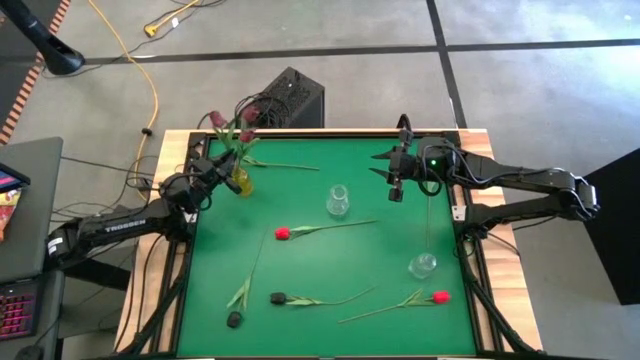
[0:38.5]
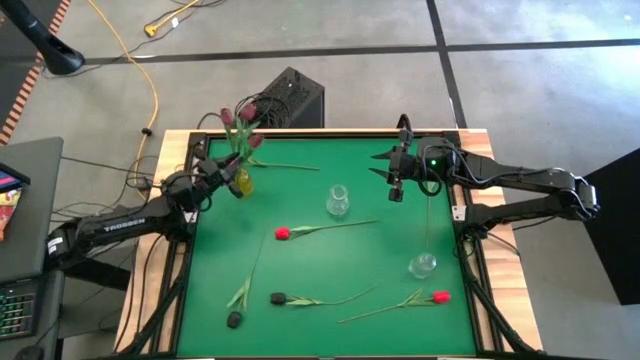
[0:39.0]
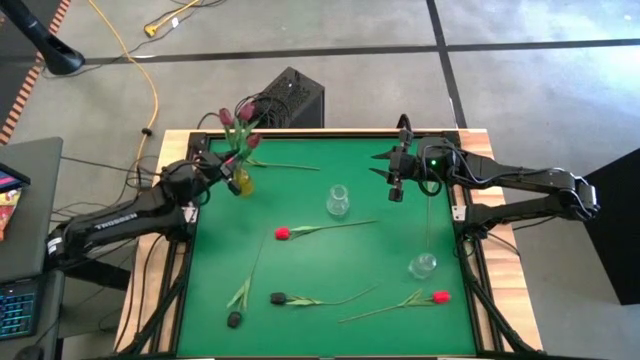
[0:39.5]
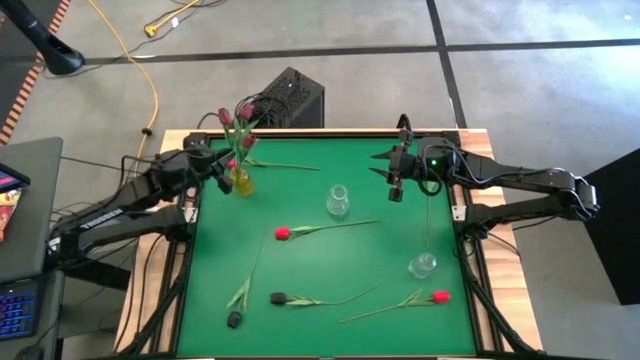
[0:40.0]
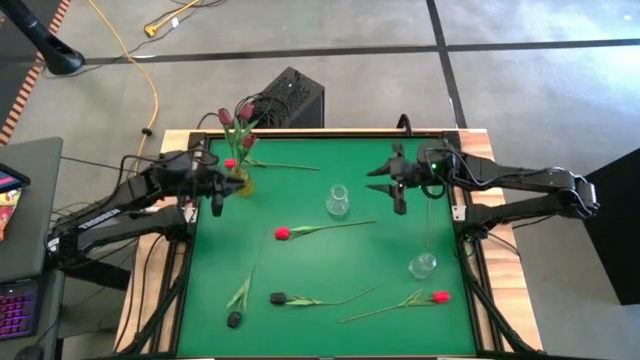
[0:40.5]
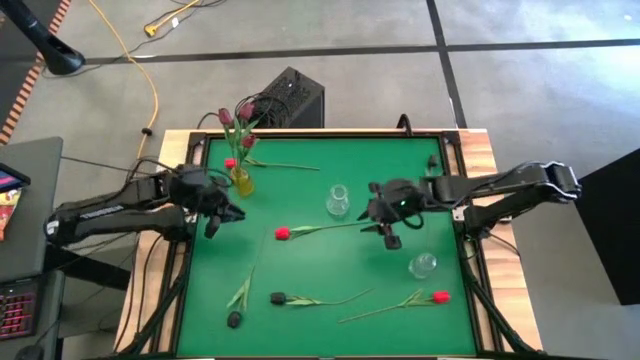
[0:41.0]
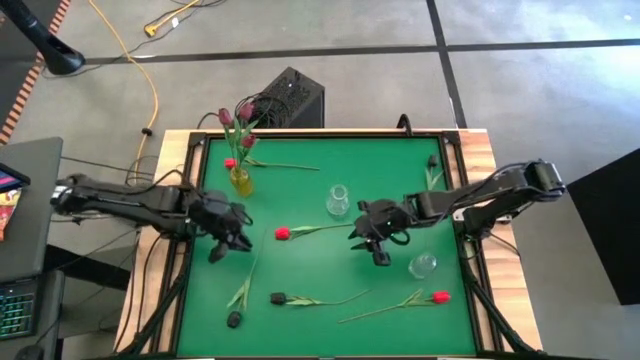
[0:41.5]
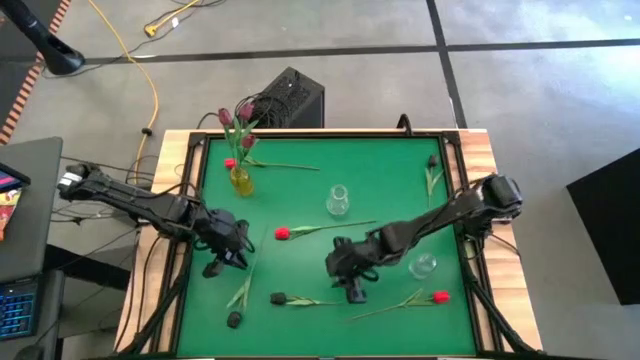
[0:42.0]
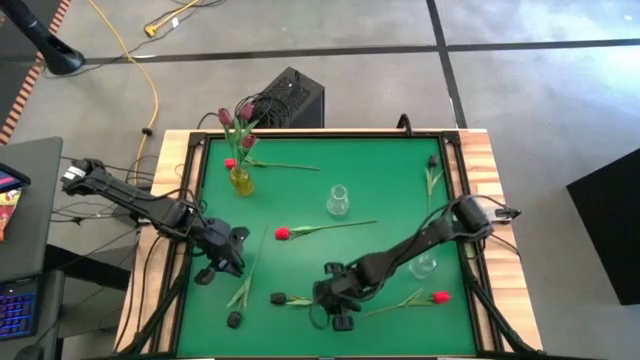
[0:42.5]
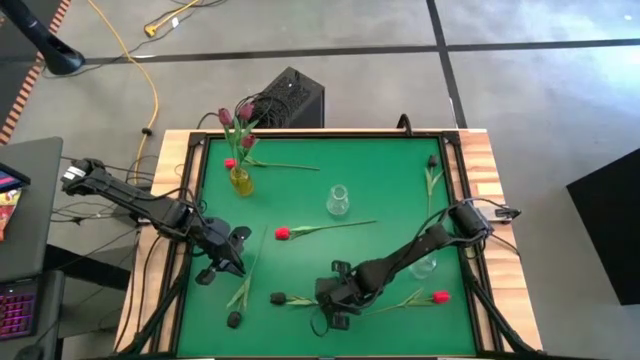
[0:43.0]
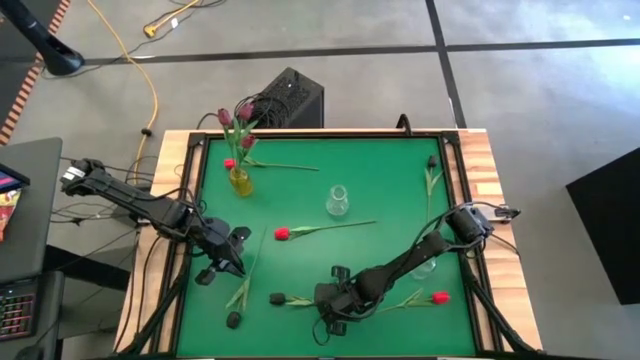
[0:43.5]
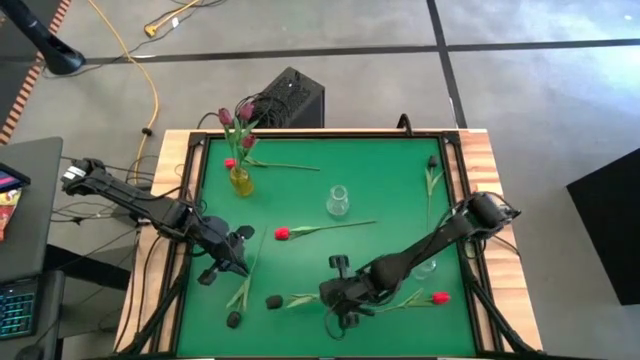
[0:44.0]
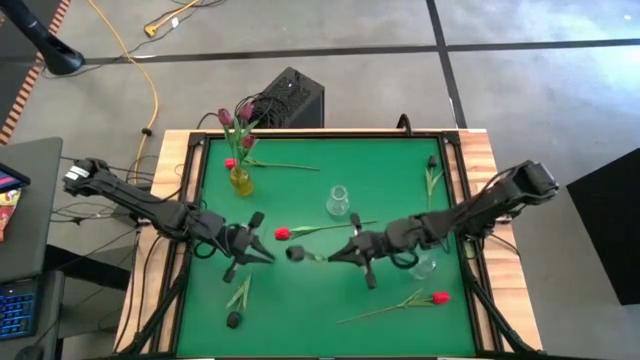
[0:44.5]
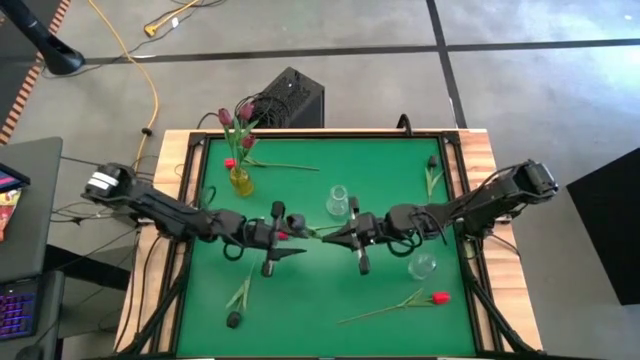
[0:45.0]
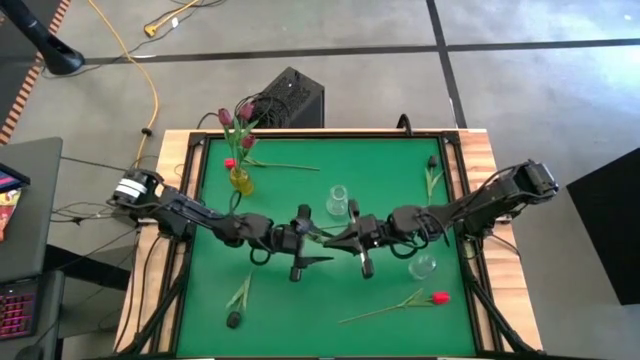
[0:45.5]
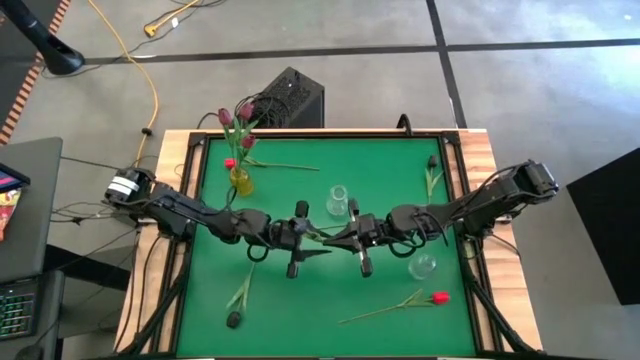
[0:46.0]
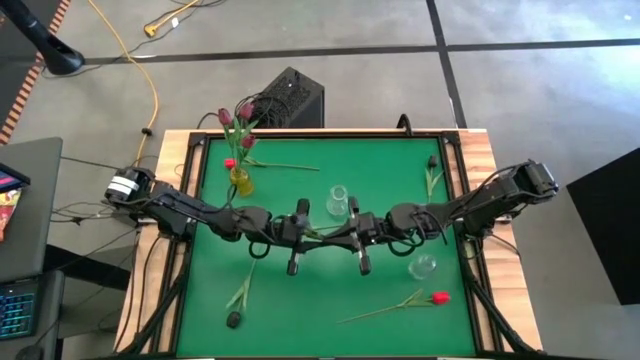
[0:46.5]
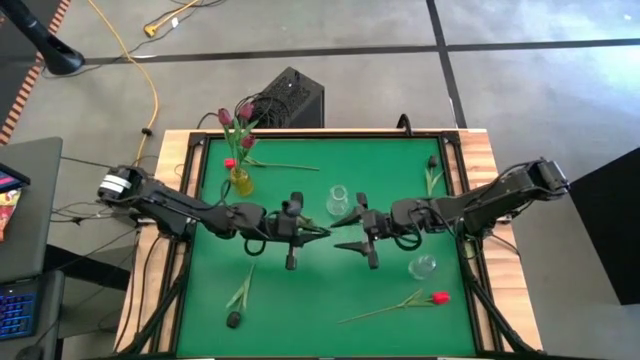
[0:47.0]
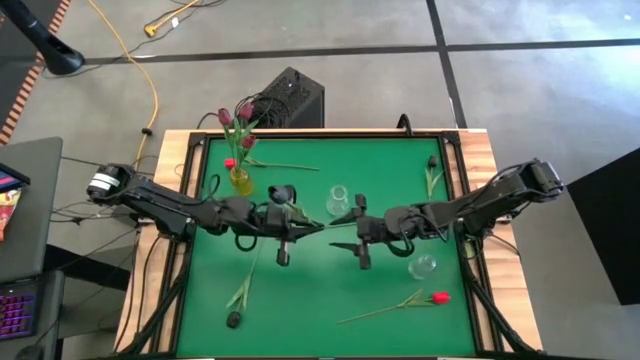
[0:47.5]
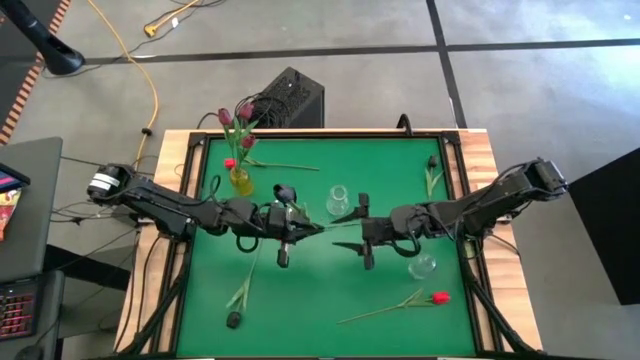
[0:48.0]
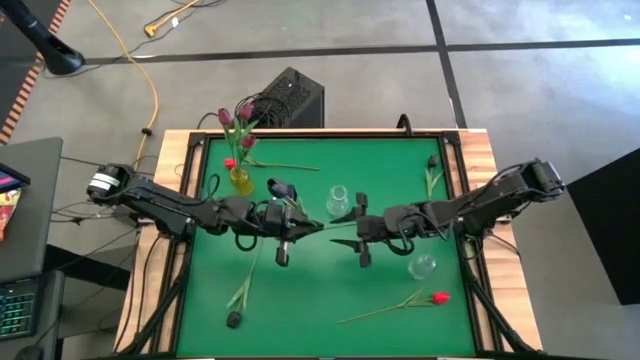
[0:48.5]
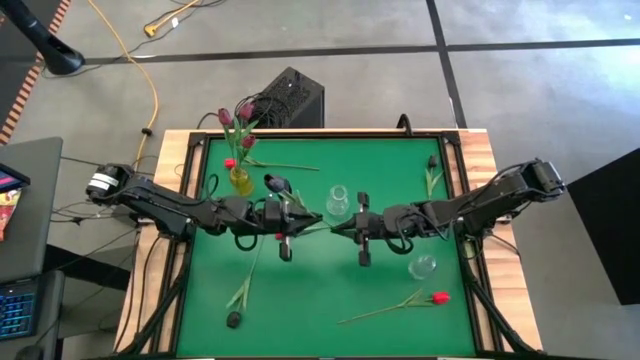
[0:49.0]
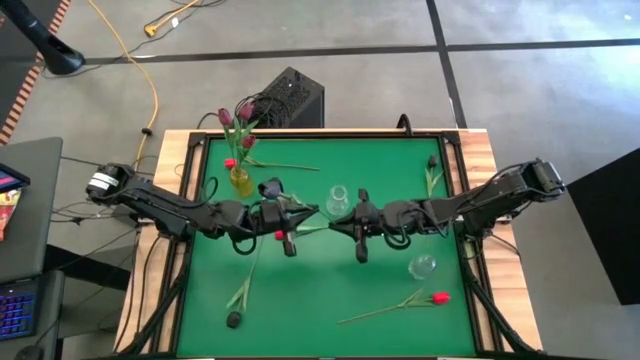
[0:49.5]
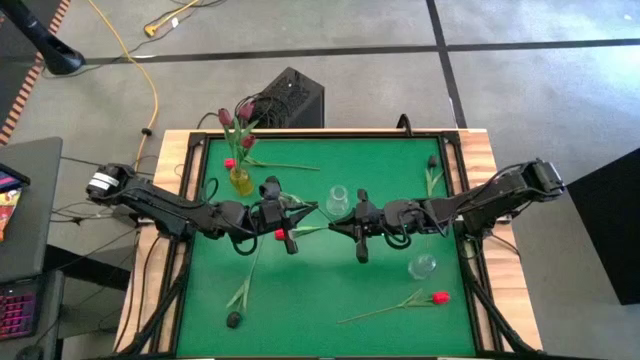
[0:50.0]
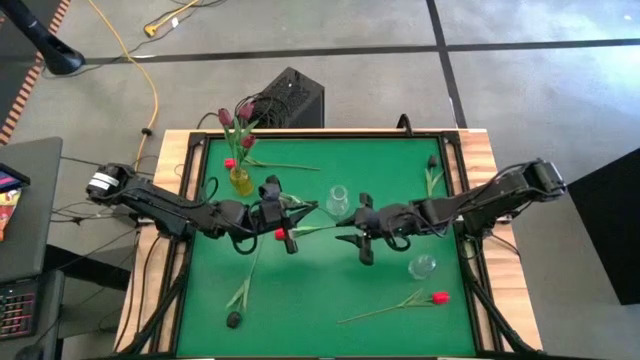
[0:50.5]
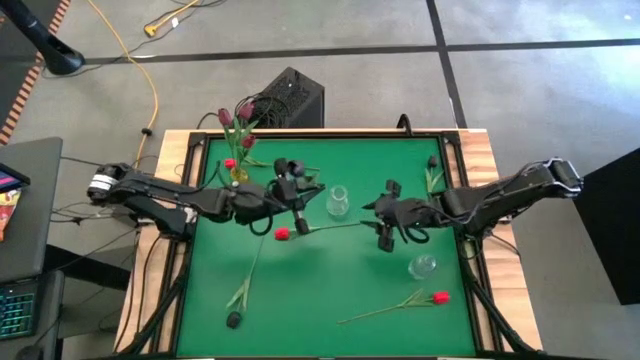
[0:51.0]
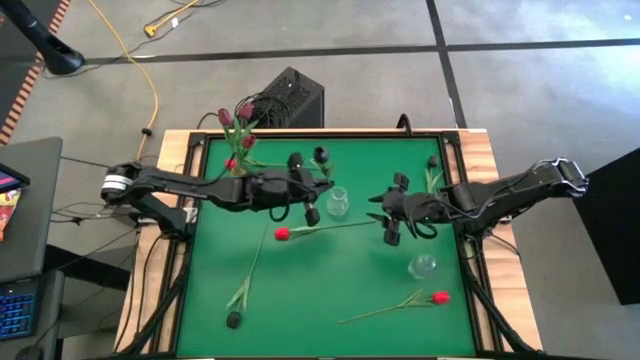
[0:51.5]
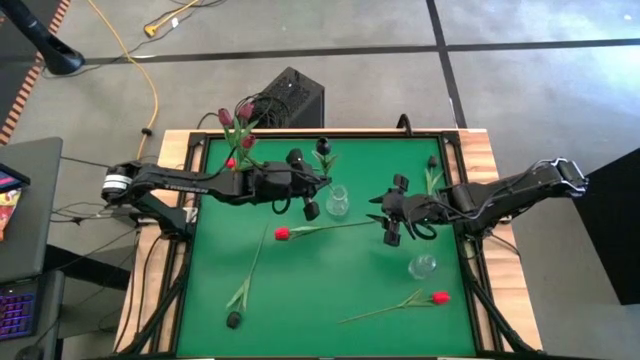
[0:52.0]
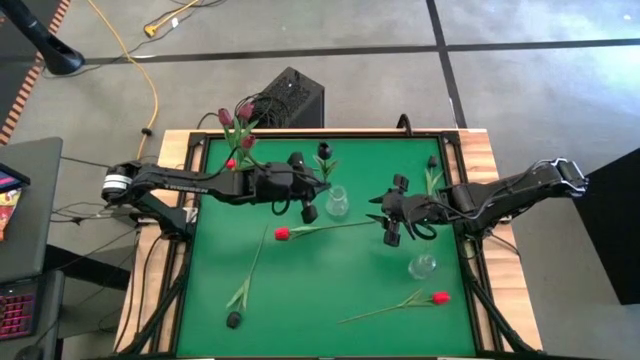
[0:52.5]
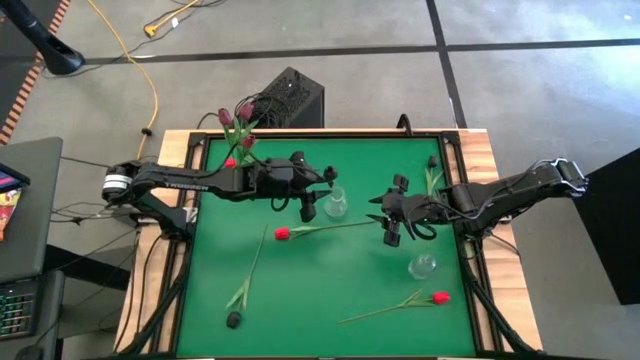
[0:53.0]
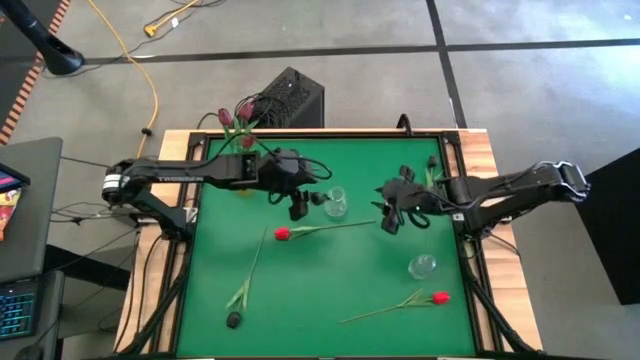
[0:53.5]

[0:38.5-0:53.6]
Task: Sort flowers into vase by color
Put the bottom middle black flower into the left transparent vase

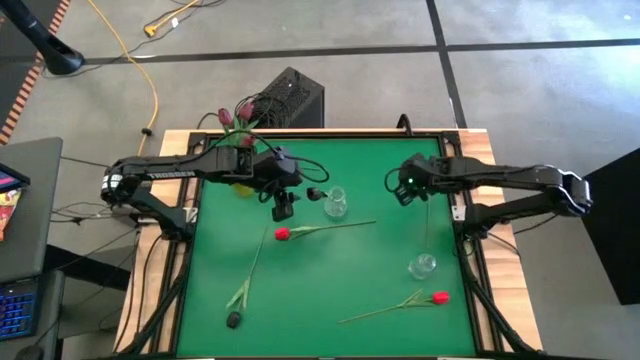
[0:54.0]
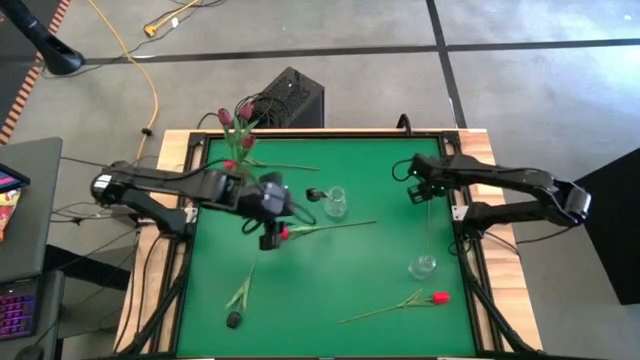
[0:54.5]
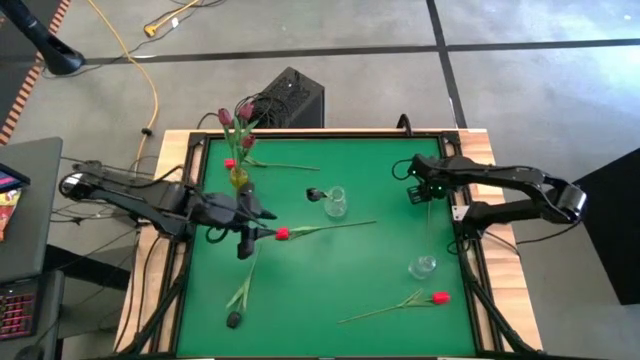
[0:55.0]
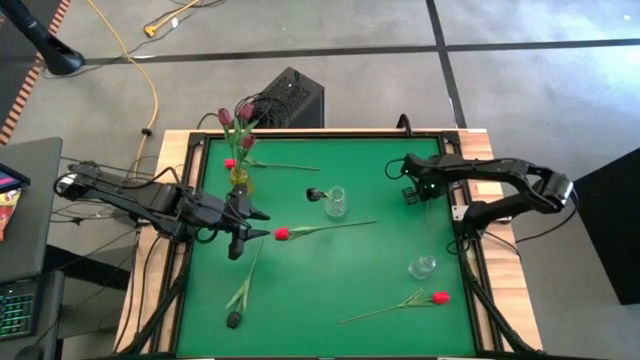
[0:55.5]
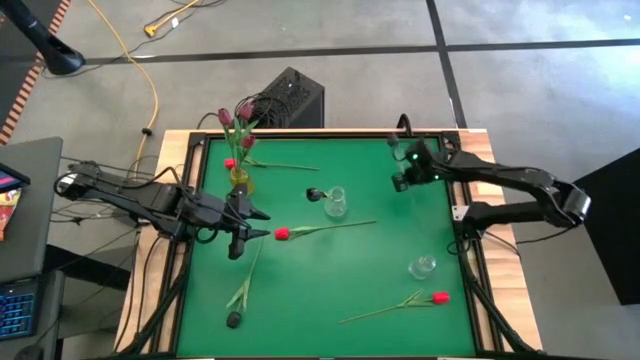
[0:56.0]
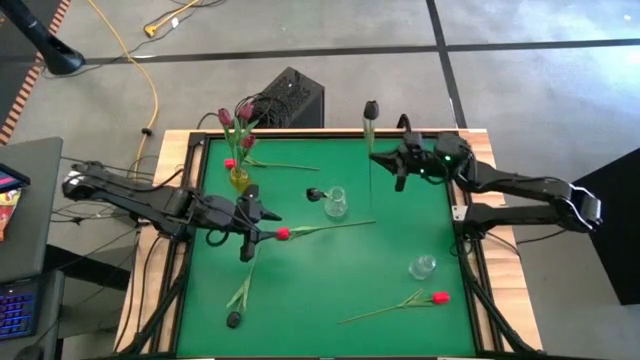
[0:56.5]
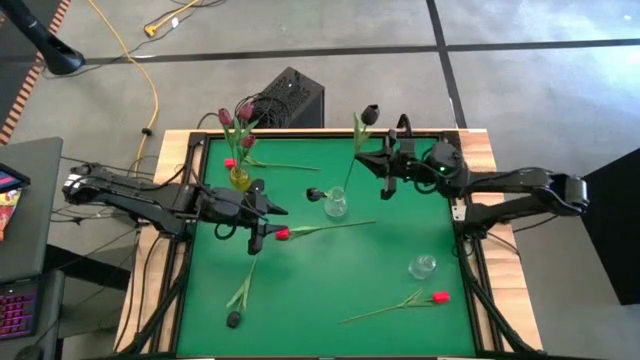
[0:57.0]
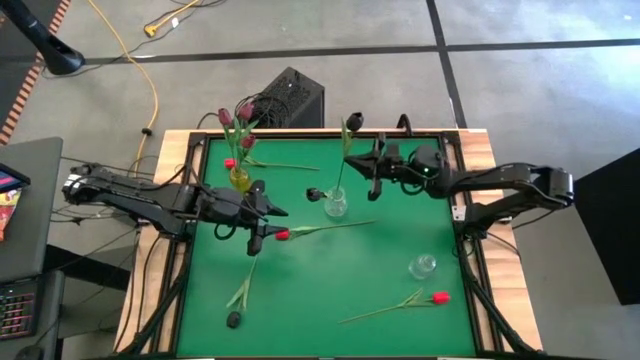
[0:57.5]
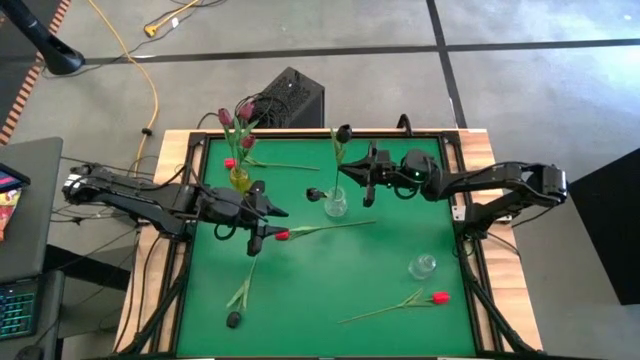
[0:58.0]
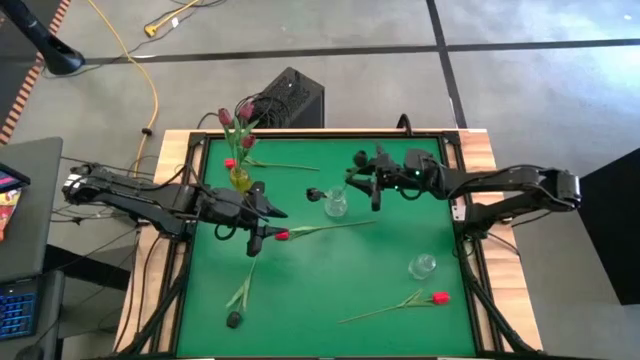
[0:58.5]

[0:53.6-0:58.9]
Put the right black flower into the left transparent vase
